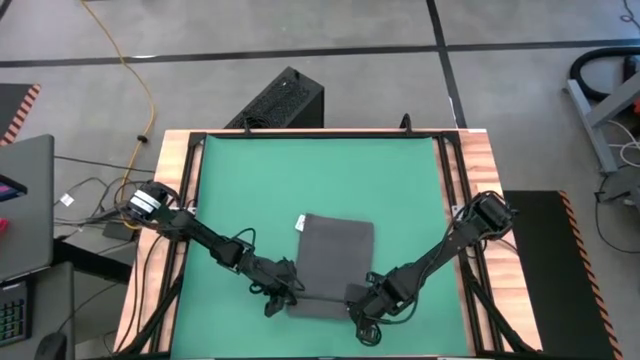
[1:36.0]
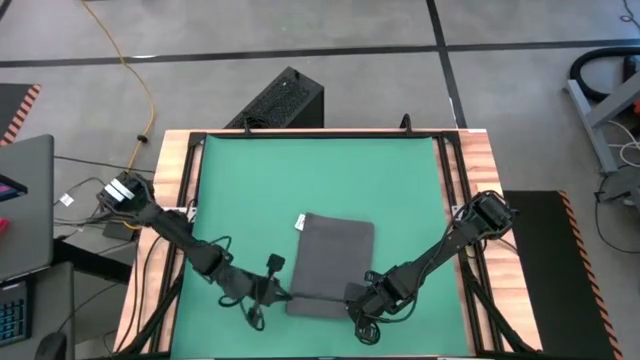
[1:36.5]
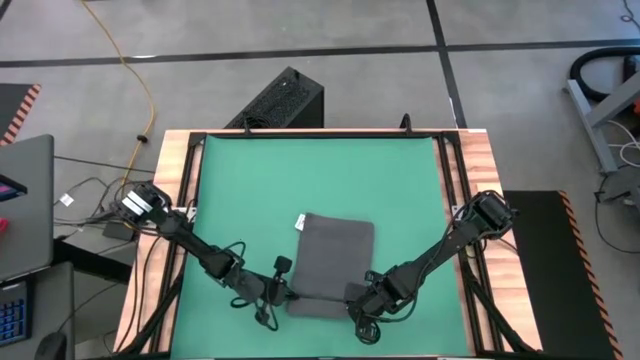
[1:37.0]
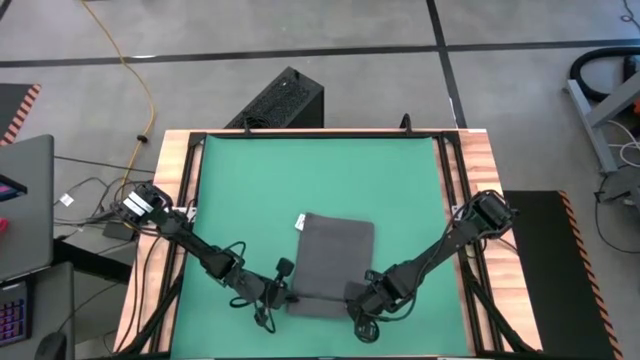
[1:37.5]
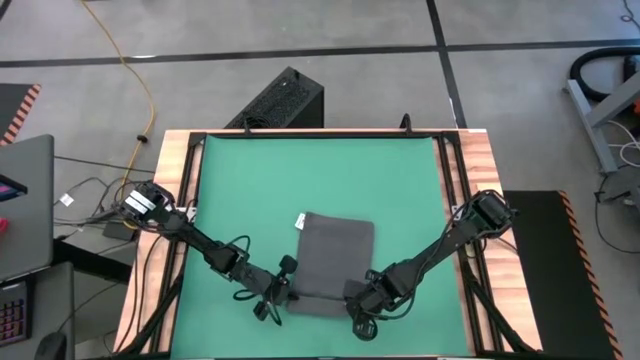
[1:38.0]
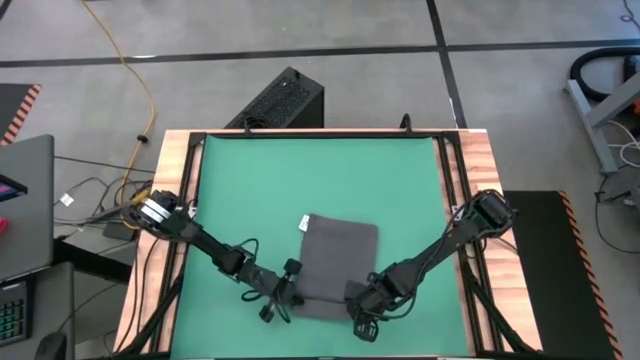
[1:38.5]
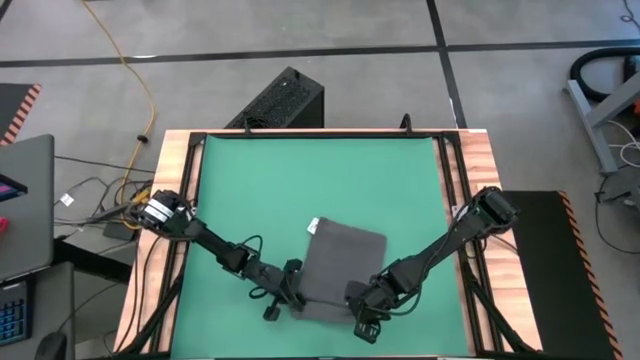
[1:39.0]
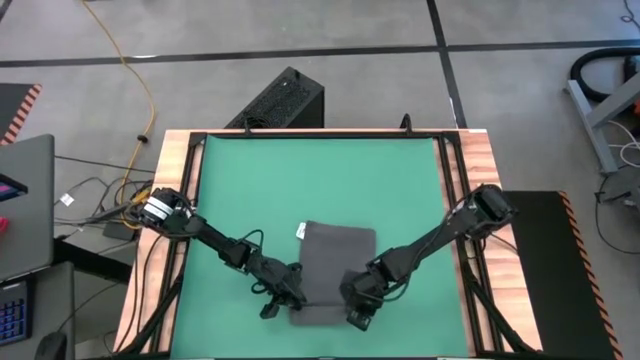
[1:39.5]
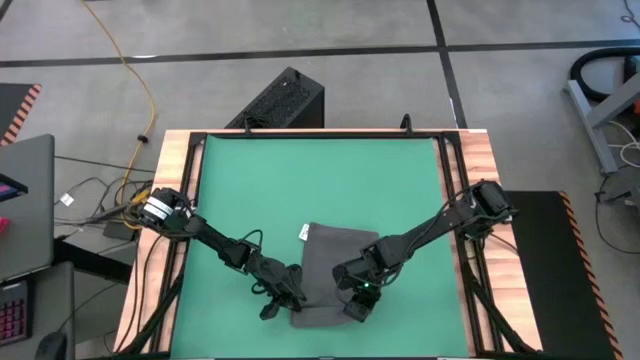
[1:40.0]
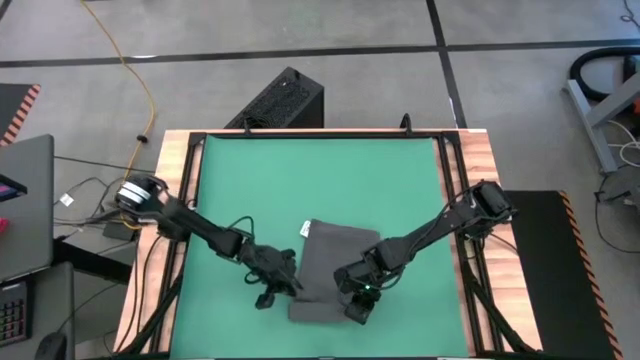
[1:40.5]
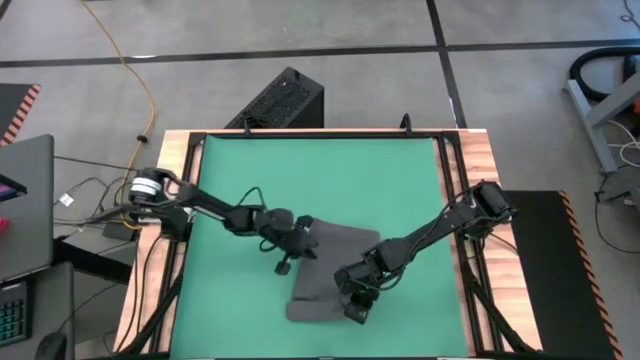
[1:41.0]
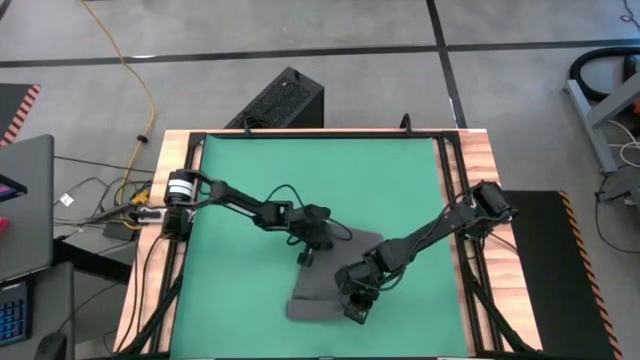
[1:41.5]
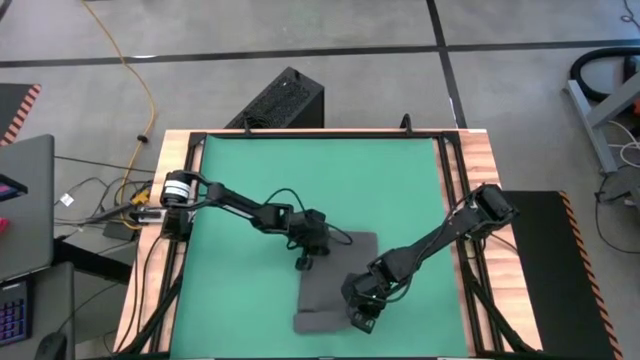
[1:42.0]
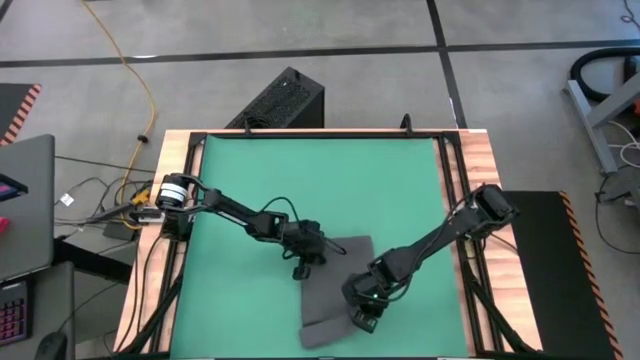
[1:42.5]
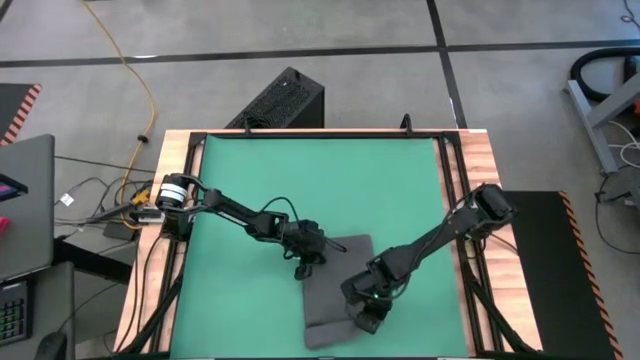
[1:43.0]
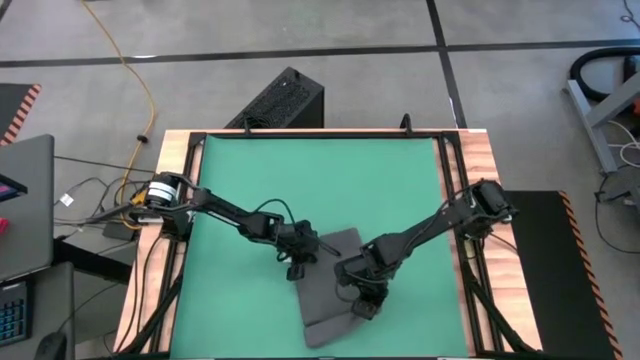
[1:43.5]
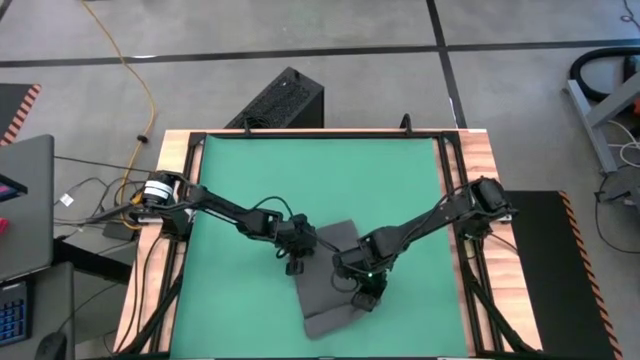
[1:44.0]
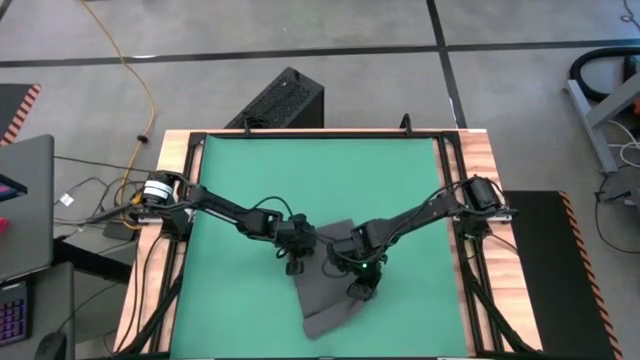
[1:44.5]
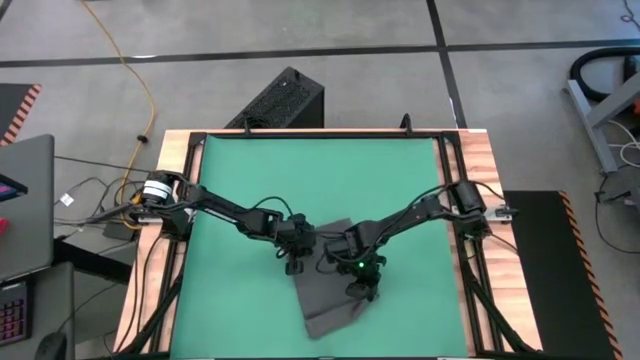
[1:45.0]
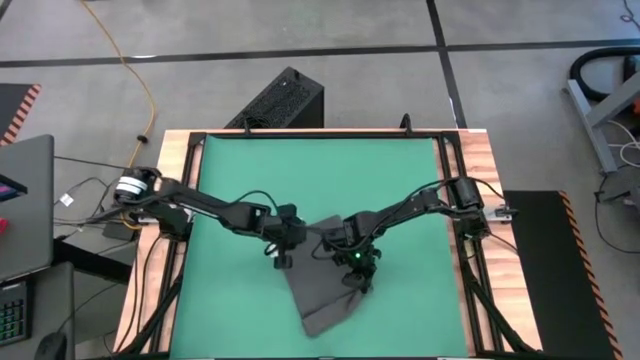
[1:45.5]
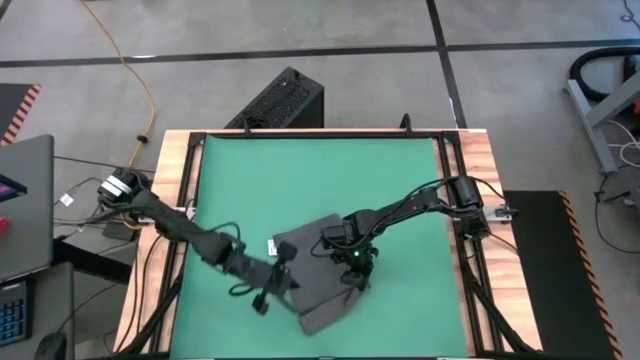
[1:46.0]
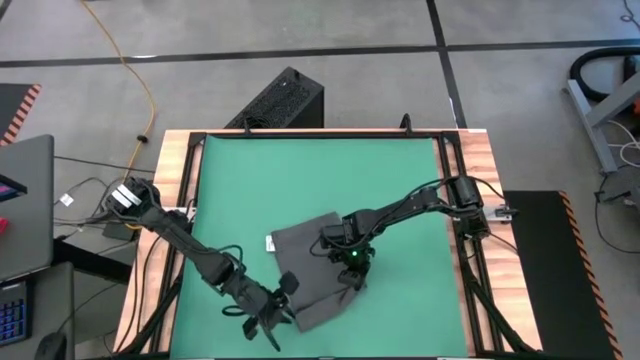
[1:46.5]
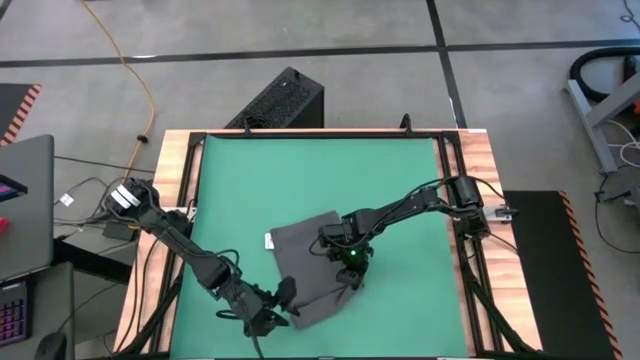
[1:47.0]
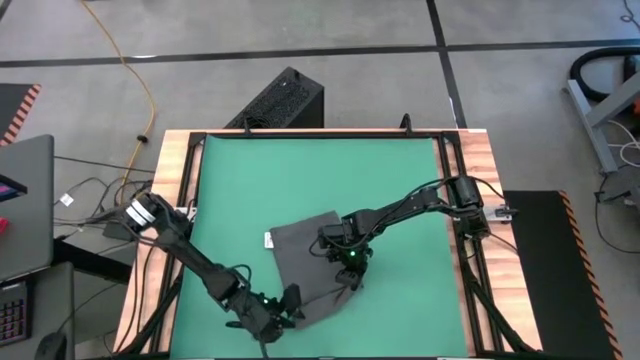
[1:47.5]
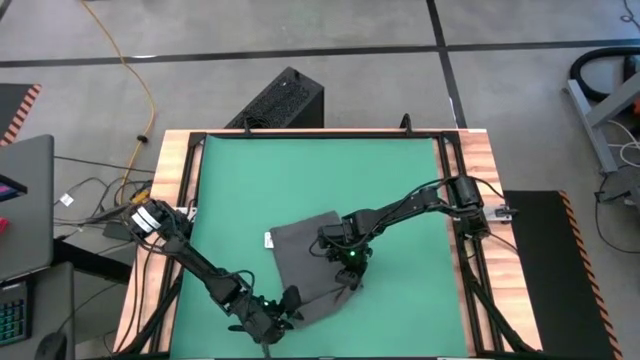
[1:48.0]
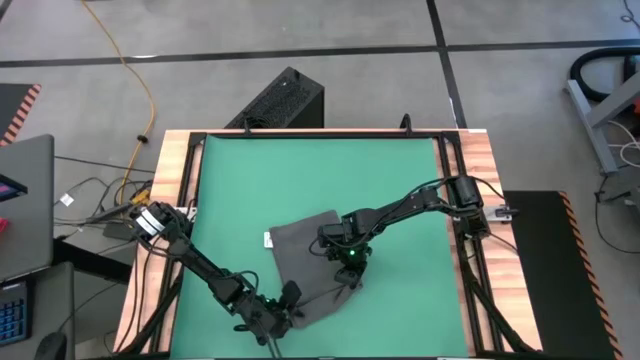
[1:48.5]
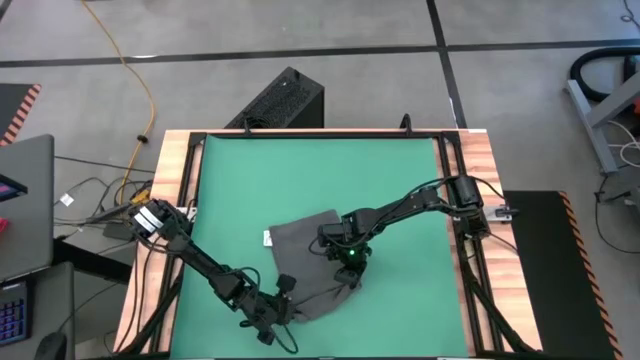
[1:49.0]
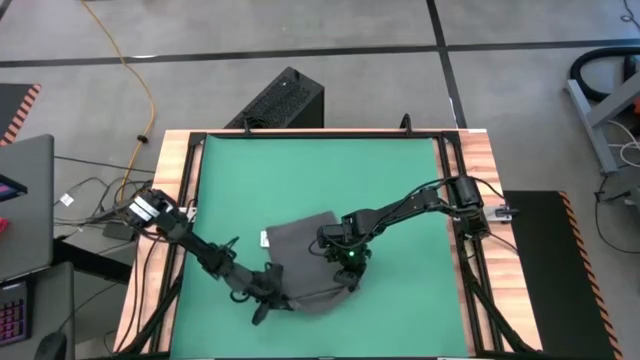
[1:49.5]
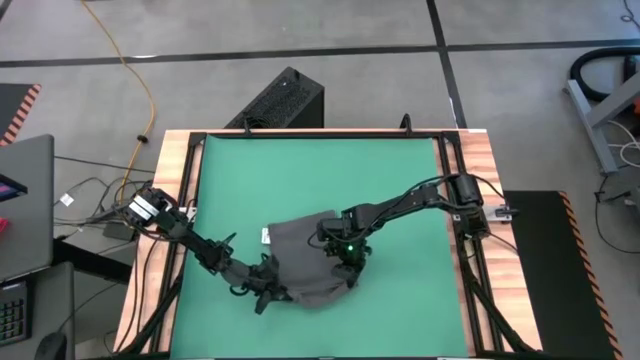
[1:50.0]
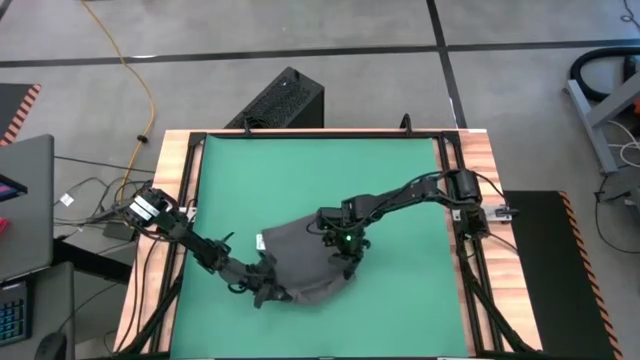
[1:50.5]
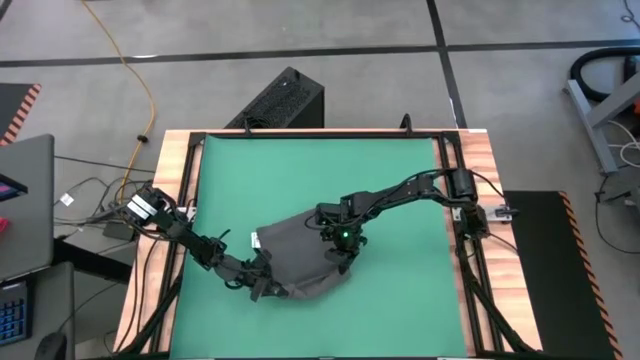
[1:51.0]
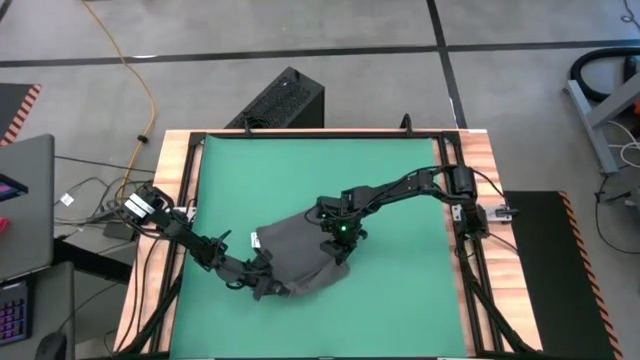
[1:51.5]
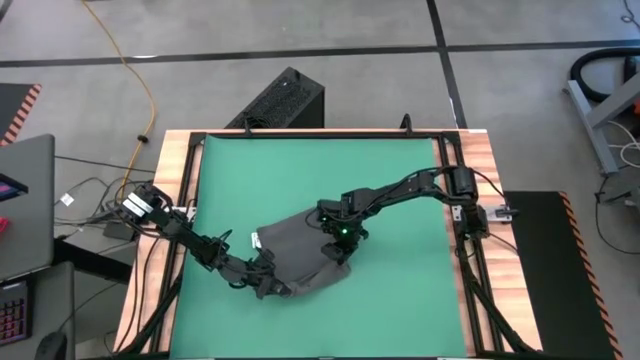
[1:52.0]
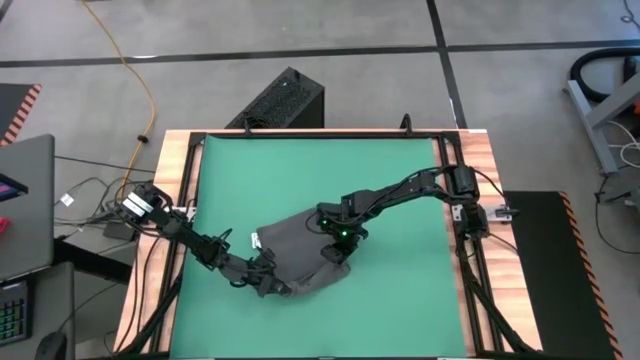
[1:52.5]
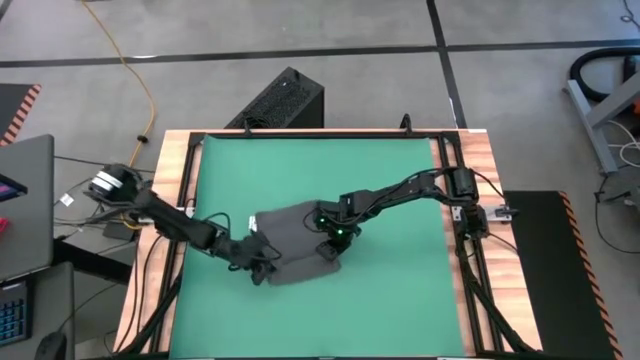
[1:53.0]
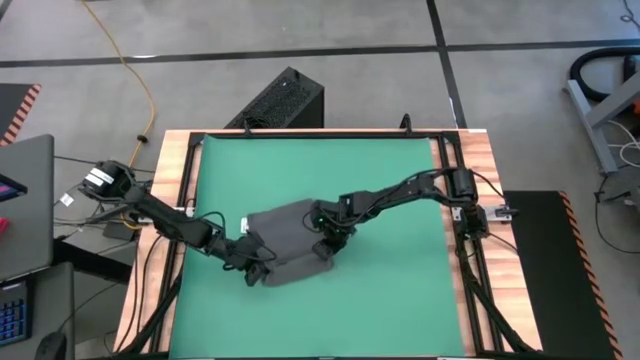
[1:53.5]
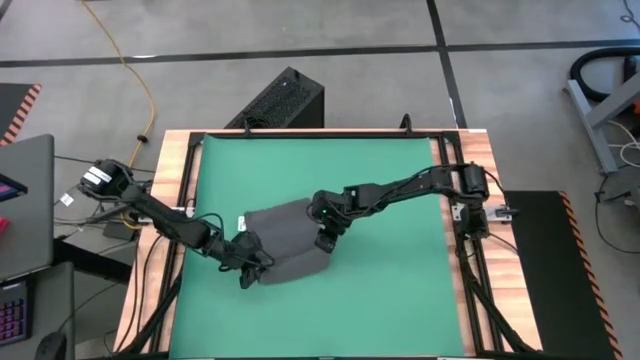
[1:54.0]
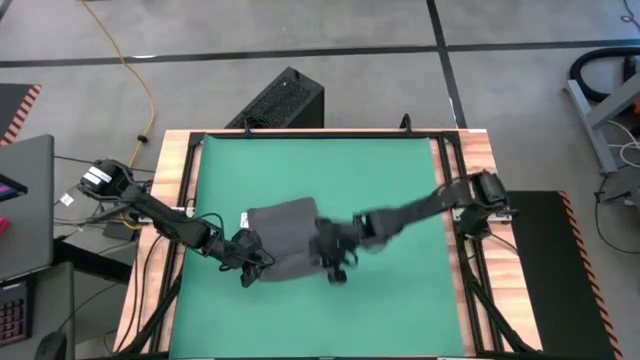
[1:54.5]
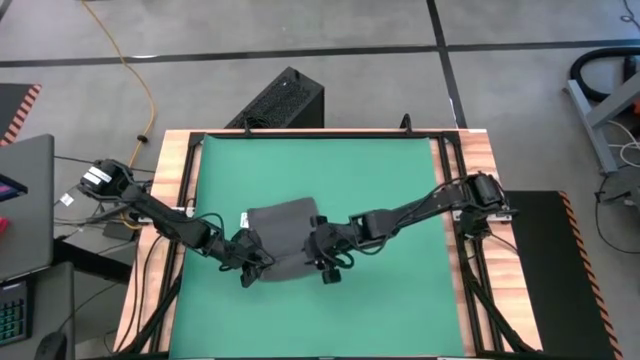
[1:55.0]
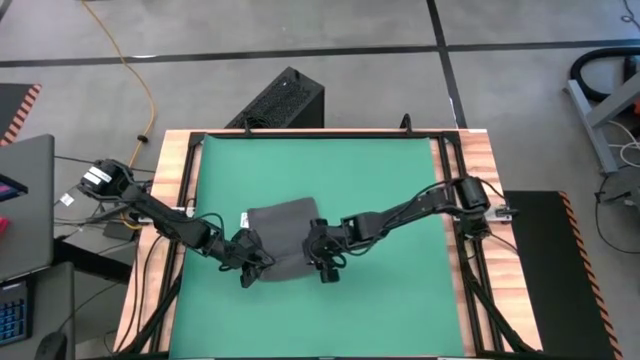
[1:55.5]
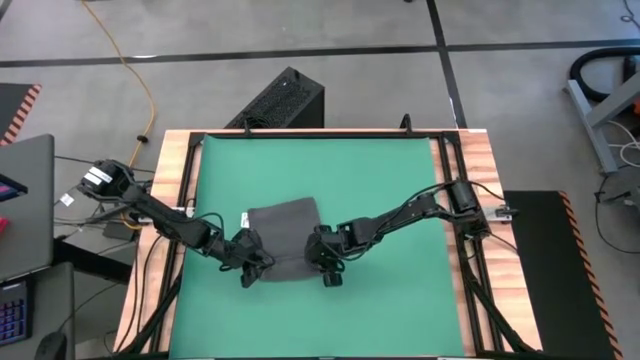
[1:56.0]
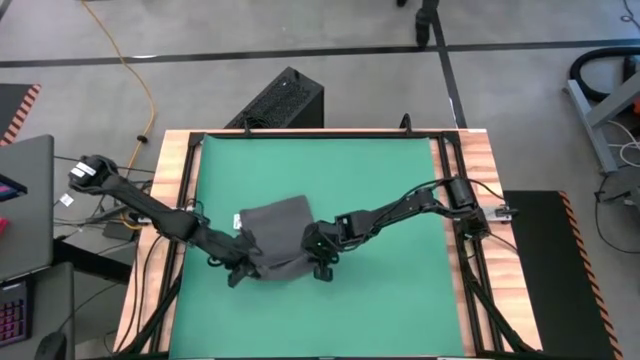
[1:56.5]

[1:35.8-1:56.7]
Task: Roll towel
Roll the gray towel
